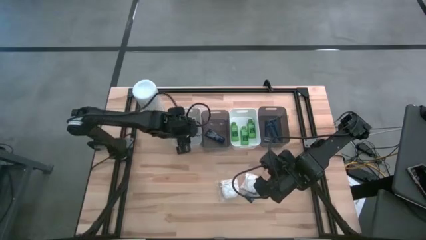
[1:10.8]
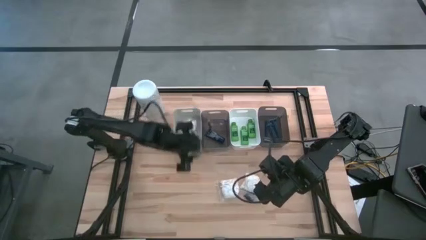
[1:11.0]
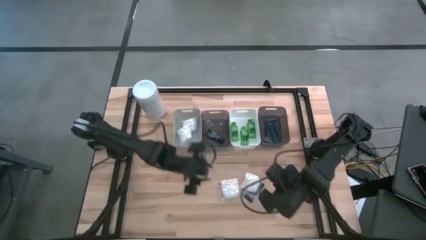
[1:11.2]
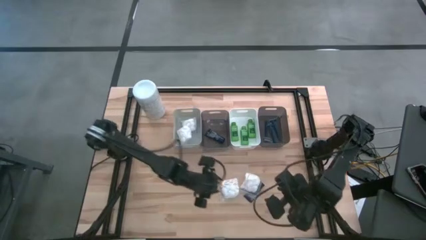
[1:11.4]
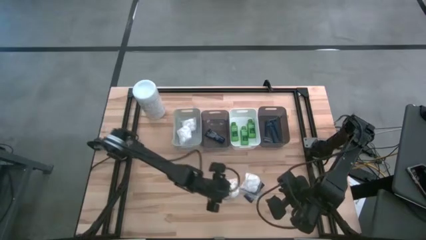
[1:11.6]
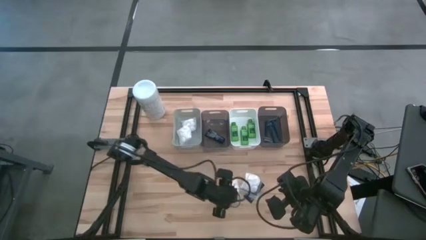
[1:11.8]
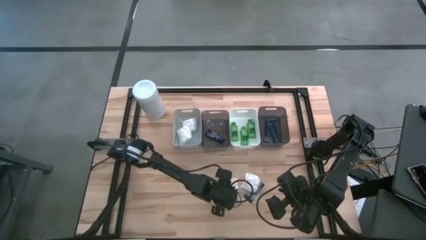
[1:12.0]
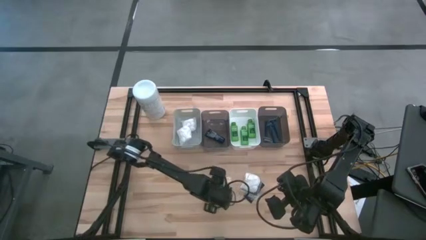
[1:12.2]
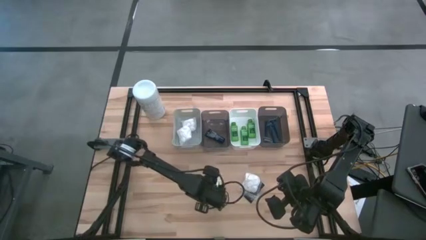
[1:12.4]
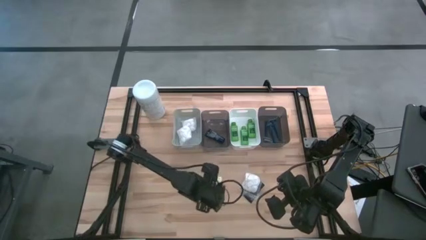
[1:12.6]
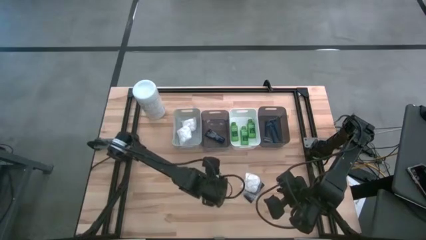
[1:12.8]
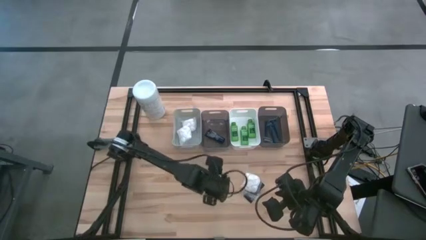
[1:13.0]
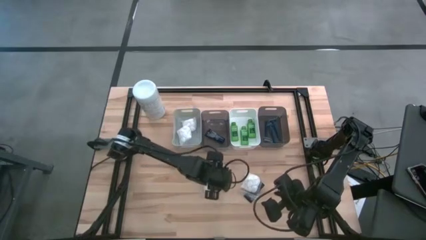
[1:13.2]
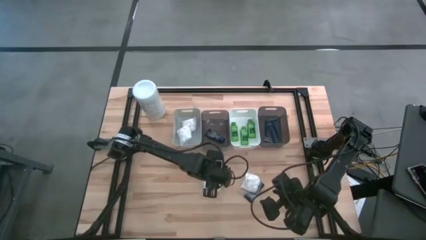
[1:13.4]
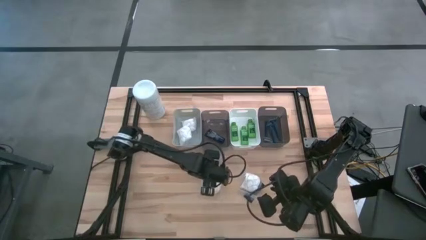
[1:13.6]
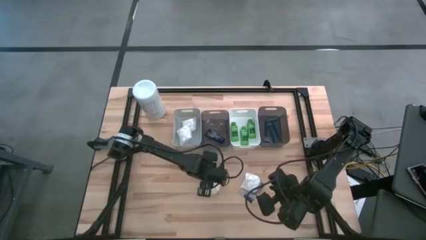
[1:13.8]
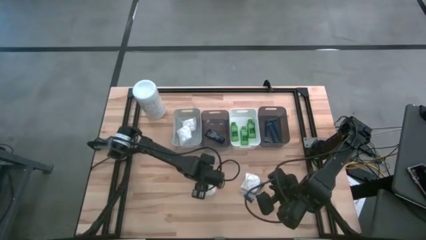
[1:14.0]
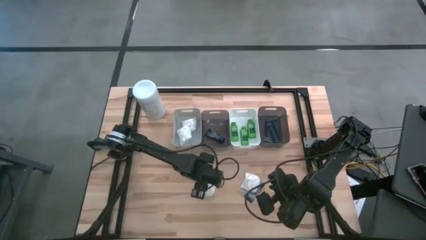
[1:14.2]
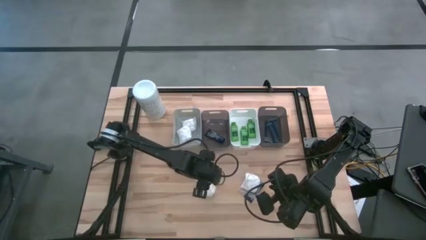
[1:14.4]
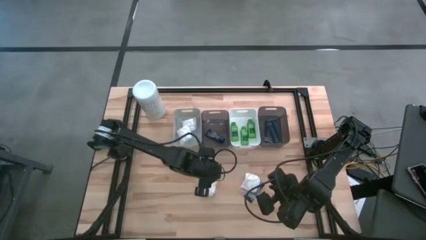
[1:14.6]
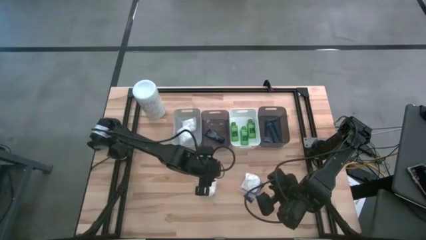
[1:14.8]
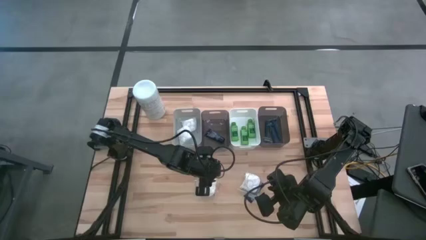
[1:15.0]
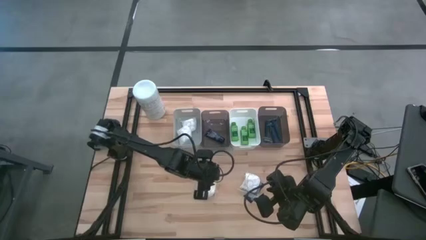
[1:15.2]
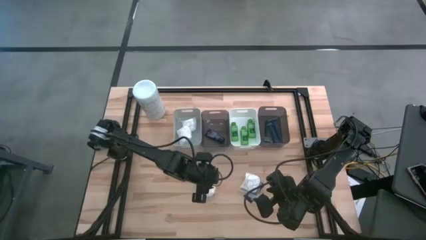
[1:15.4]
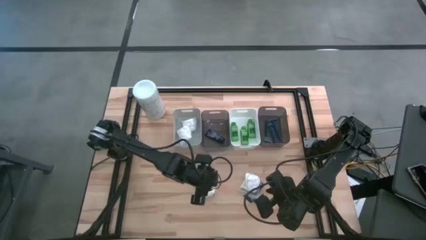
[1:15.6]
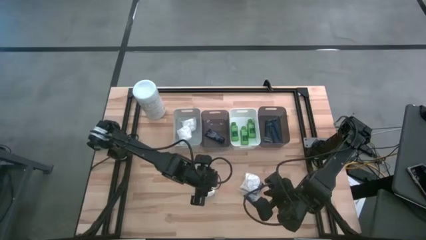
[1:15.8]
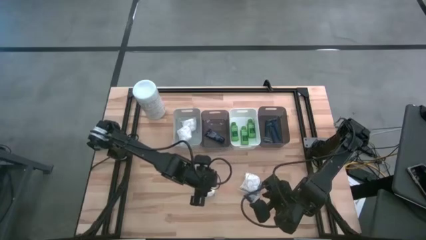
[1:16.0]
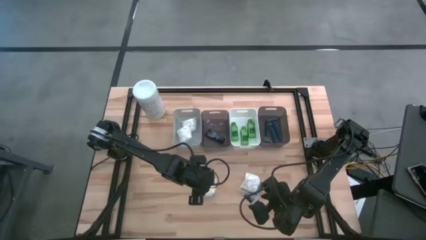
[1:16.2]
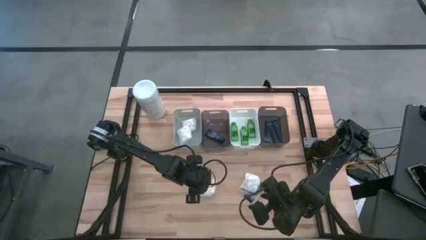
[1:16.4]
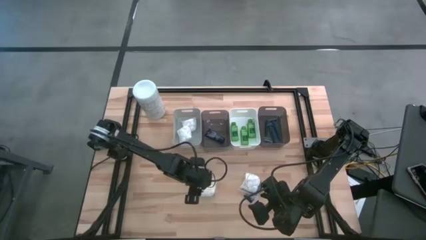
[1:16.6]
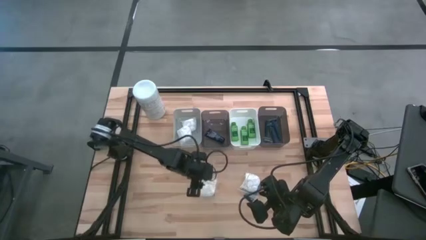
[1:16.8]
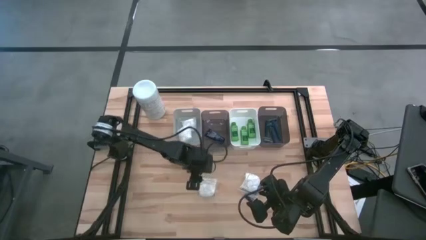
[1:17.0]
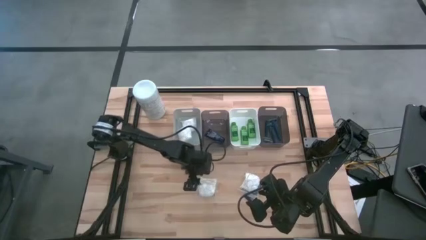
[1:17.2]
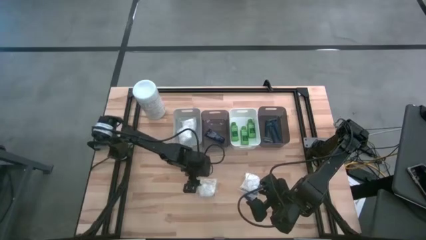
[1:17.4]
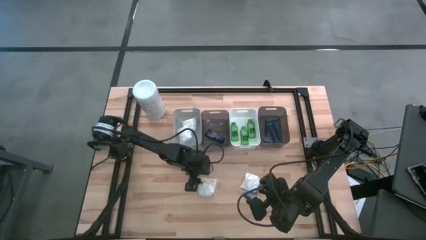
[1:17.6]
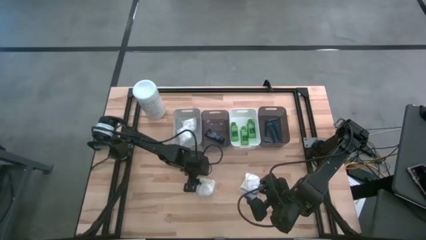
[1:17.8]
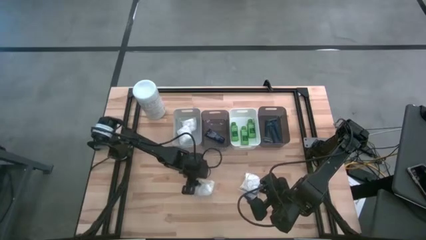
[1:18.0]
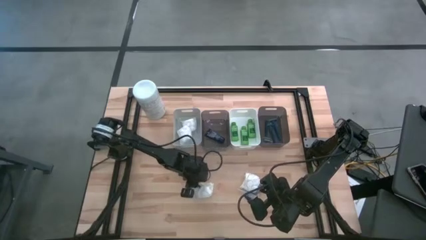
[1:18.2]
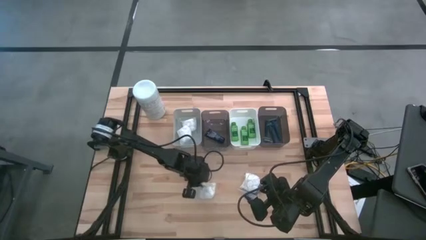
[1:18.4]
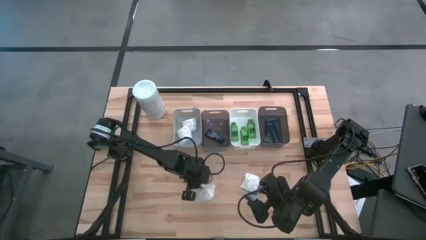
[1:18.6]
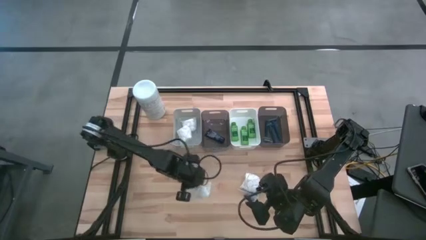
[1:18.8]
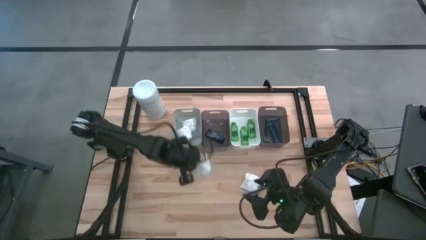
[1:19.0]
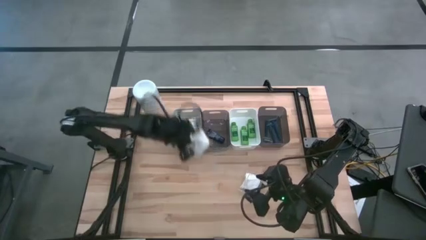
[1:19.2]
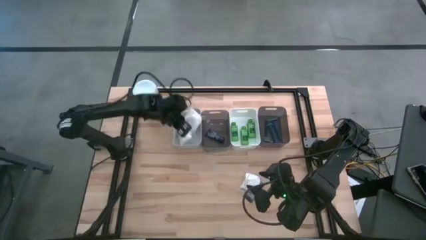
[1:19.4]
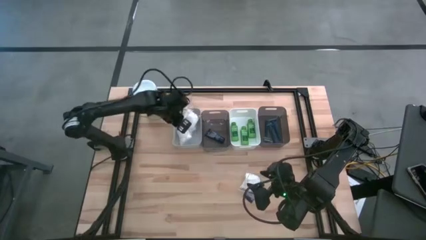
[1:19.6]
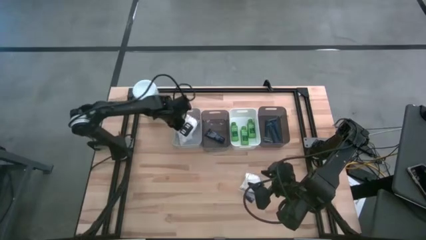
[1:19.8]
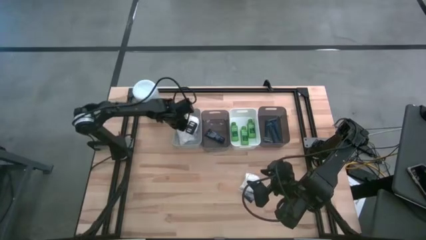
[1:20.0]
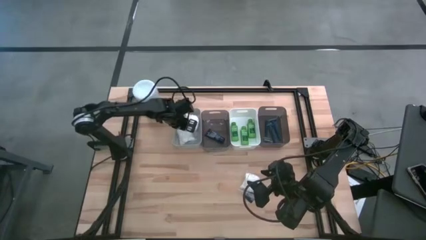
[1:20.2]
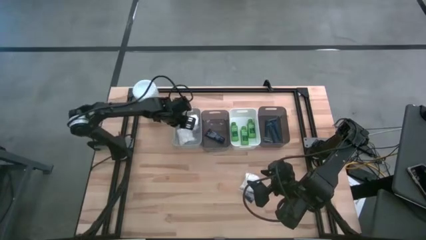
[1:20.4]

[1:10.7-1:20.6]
Task: Pick & Place Travel size toiletries
Put the cotton pack into the gray bin

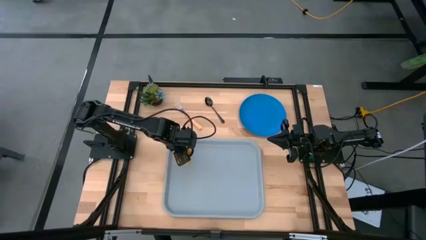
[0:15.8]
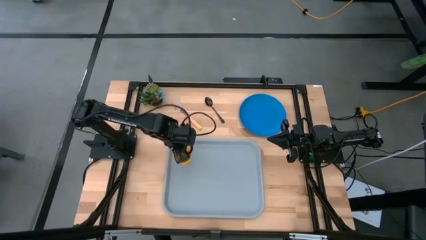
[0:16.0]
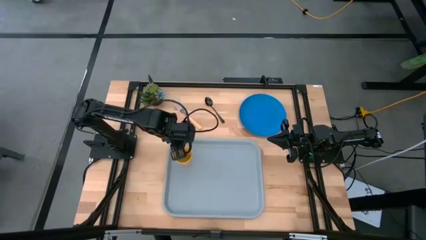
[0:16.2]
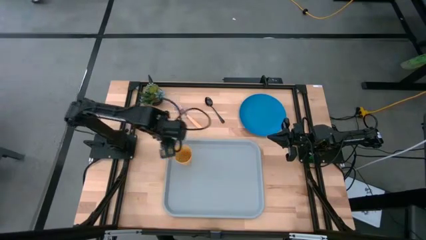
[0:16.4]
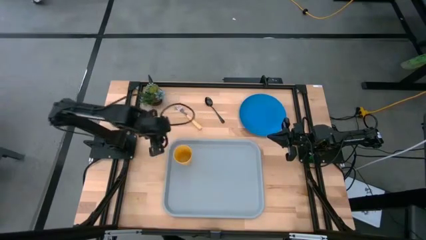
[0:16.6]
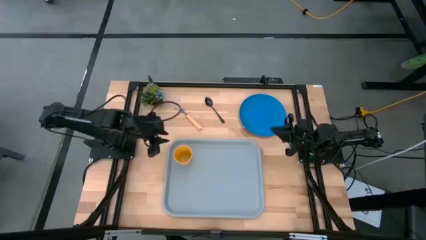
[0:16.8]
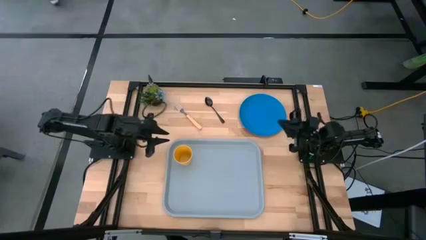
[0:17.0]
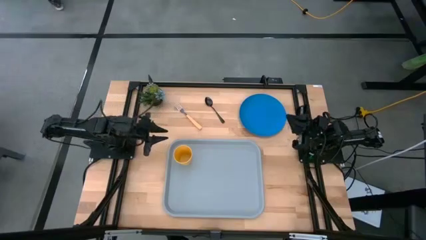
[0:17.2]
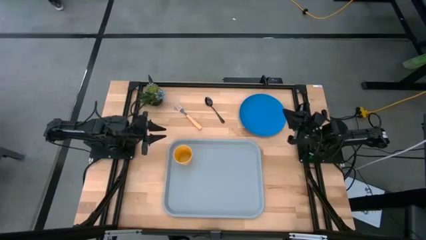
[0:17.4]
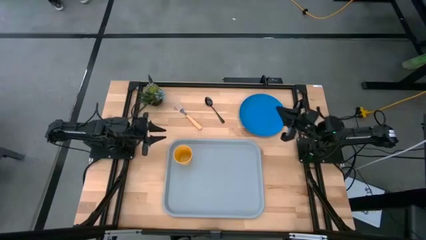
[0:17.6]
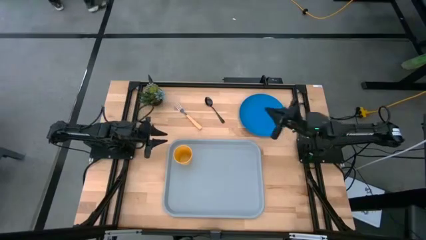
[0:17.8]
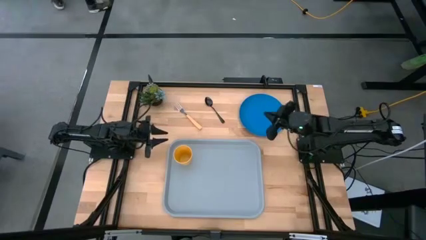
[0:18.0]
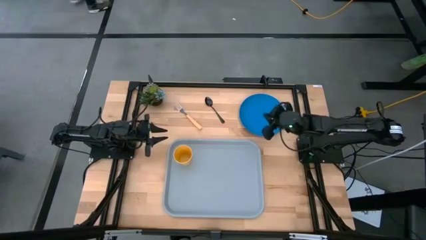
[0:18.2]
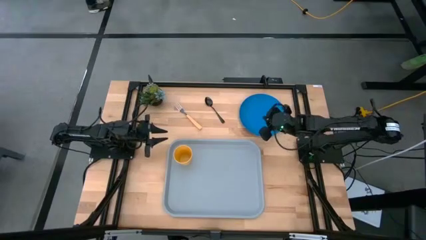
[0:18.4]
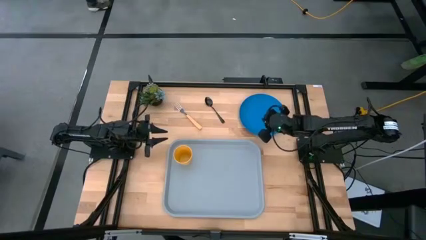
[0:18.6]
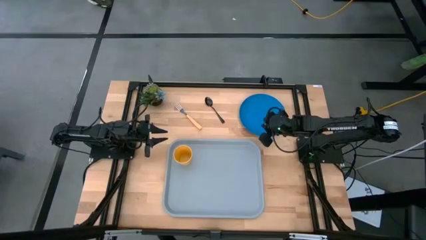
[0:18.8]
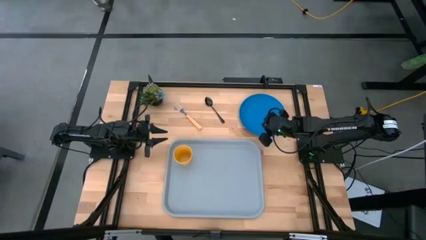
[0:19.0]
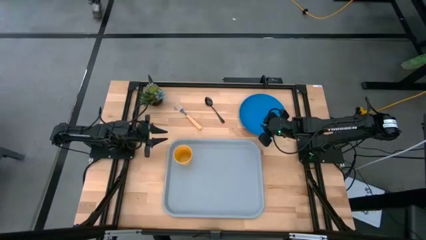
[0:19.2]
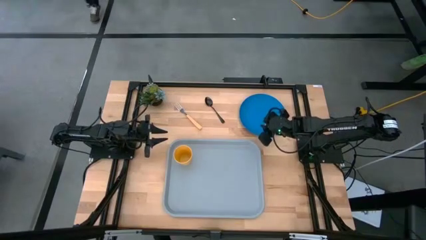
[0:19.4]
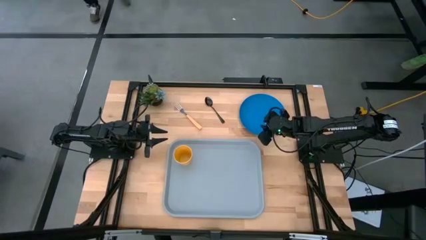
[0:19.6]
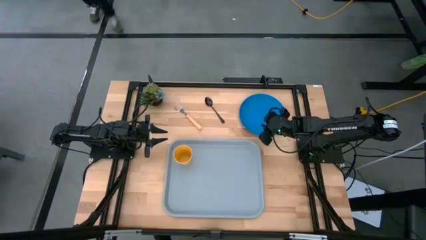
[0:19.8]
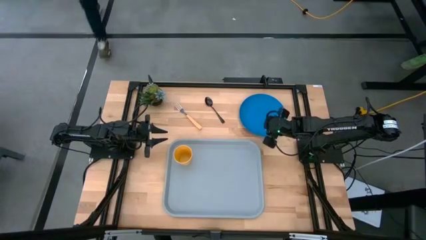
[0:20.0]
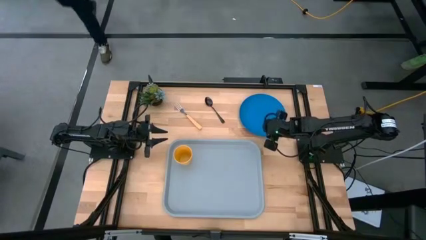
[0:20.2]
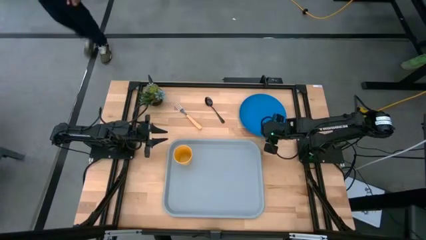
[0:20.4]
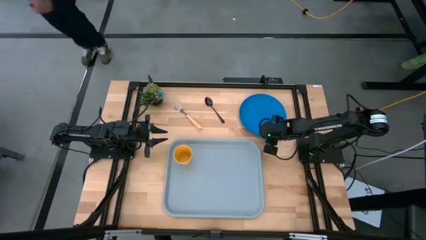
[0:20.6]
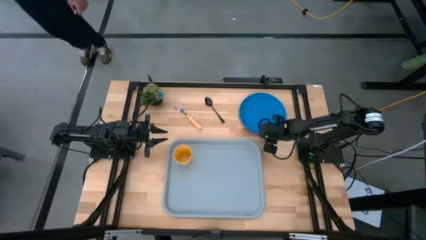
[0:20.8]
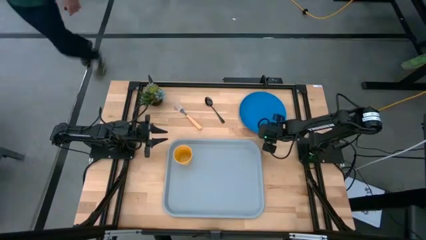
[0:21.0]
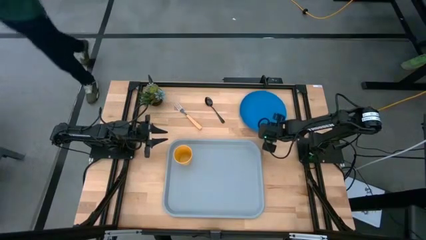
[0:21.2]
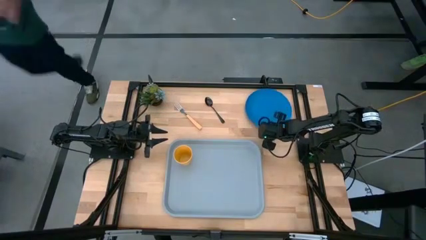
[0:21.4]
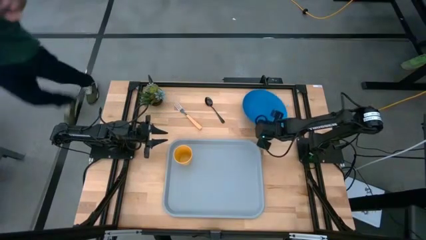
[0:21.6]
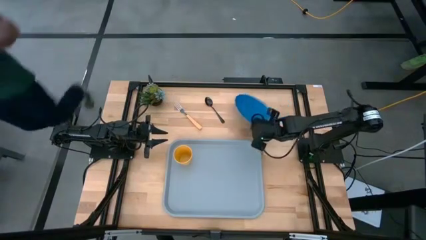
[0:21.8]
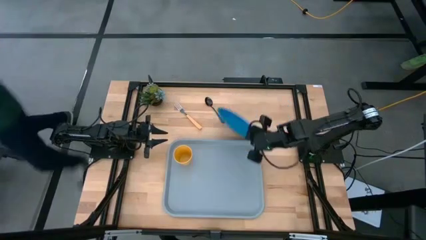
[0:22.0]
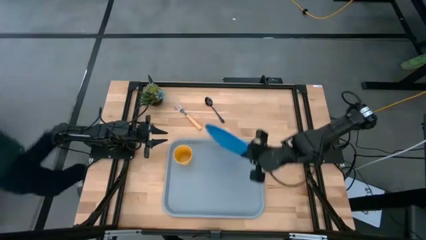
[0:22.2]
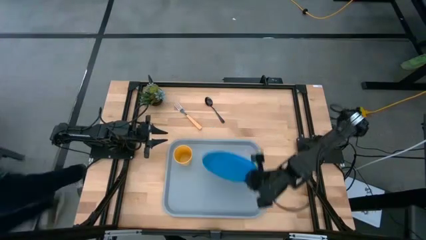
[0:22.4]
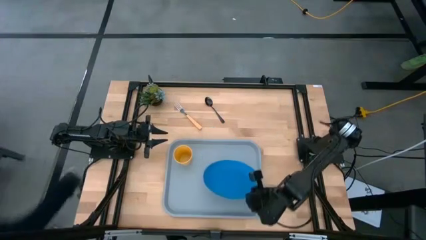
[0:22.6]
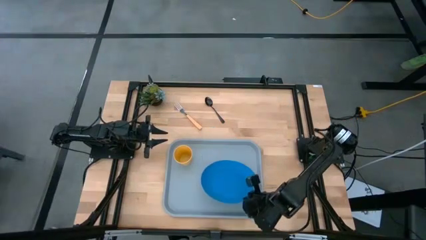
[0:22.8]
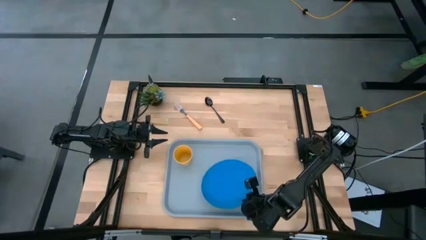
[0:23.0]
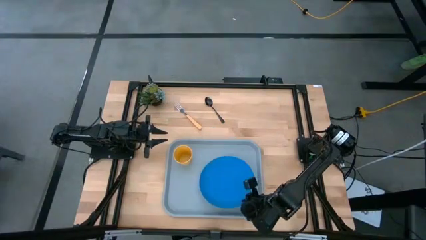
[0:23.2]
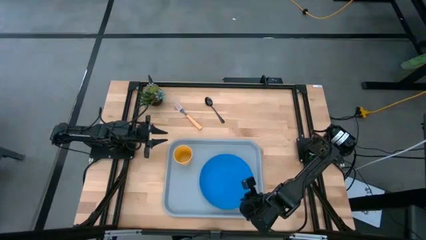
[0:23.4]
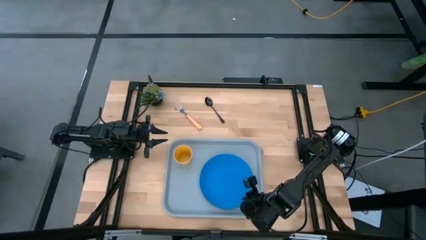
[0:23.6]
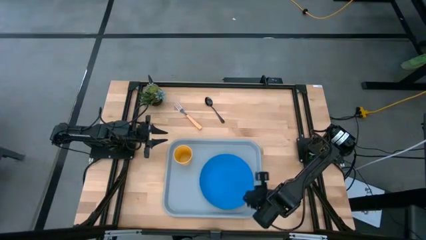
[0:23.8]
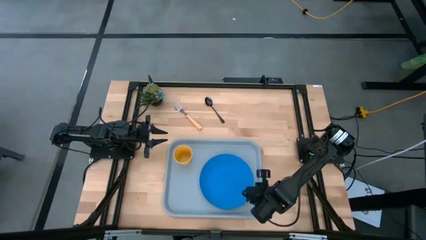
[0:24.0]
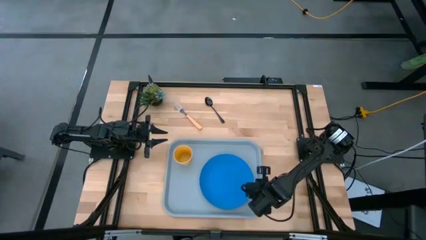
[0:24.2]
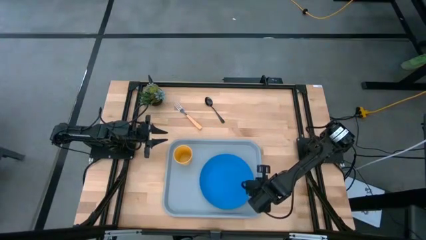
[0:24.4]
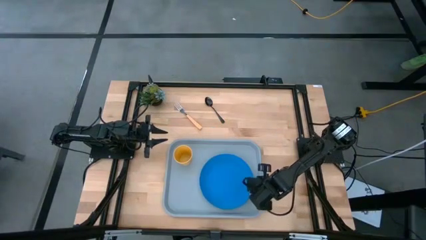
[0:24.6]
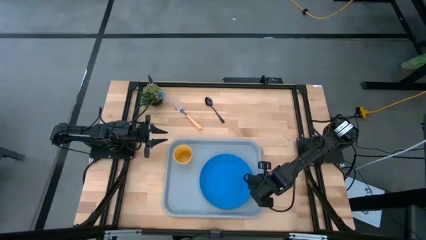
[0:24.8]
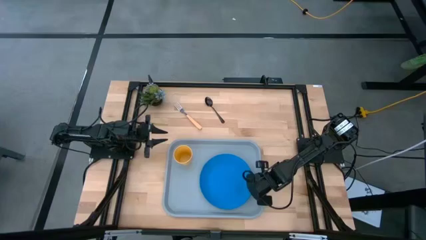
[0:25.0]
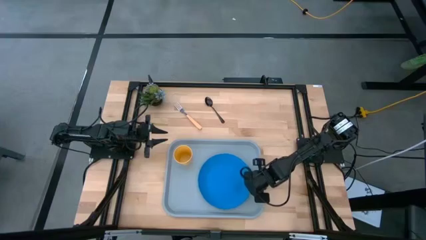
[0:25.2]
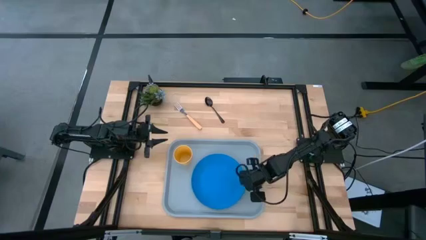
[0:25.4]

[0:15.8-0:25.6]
Task: Pick and place plate/cup/fork/spoon on tray
Put the blue plate on the gray tray to the bottom right of the yellow cup
